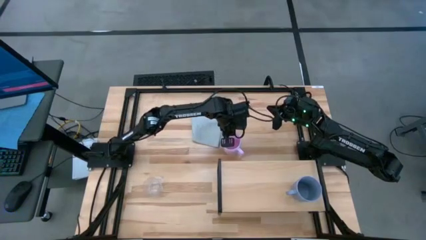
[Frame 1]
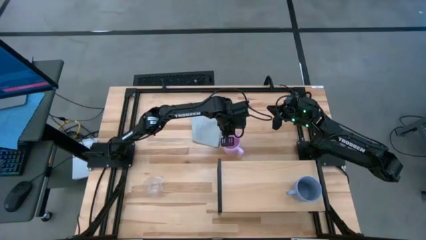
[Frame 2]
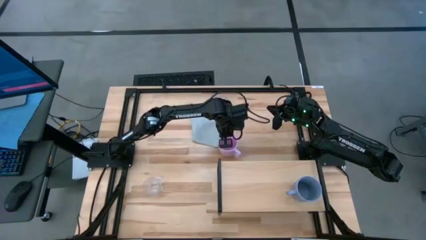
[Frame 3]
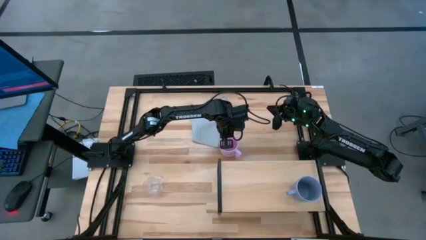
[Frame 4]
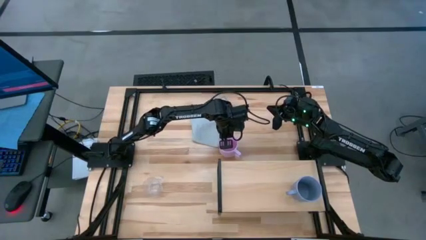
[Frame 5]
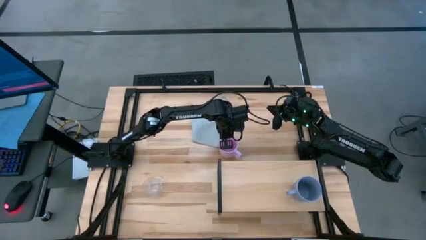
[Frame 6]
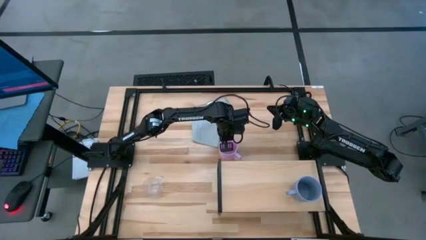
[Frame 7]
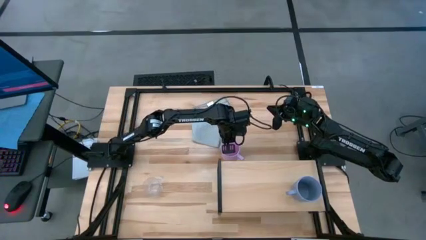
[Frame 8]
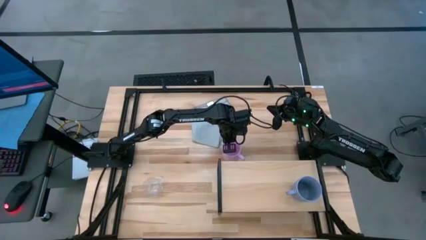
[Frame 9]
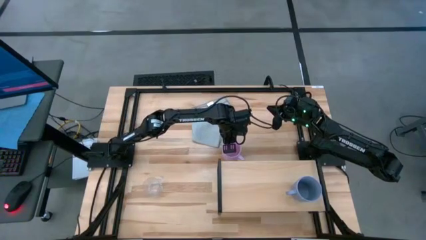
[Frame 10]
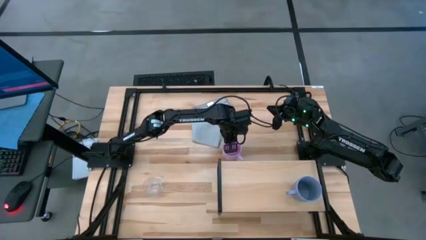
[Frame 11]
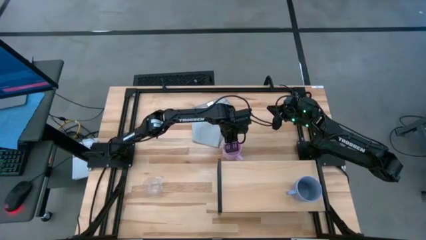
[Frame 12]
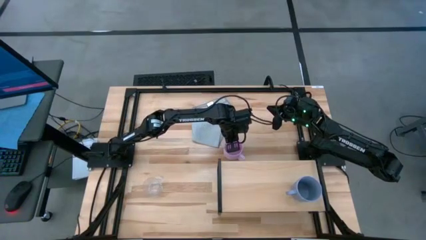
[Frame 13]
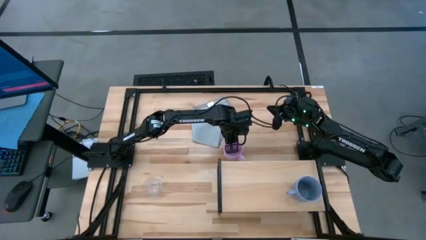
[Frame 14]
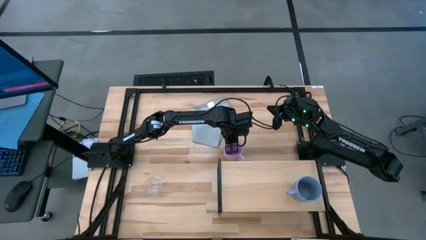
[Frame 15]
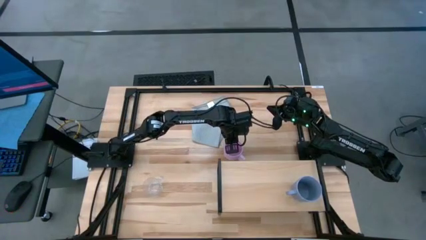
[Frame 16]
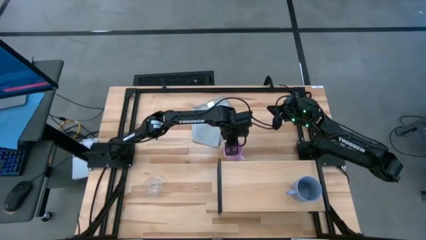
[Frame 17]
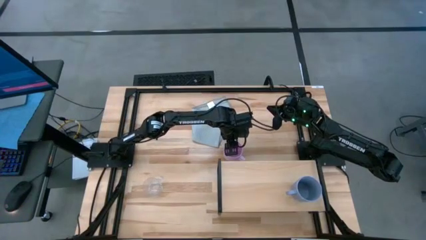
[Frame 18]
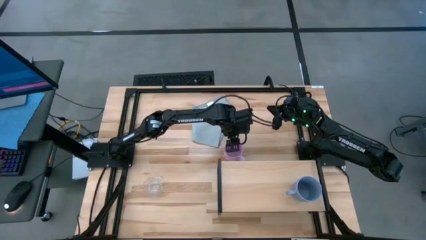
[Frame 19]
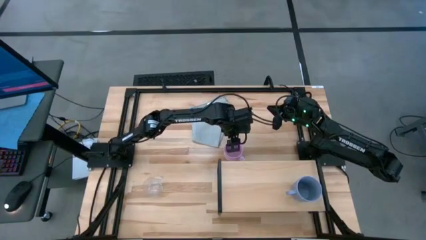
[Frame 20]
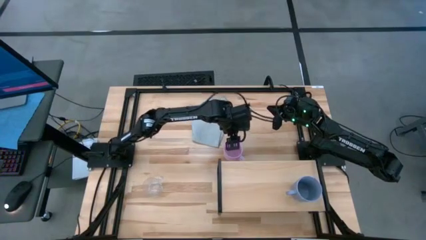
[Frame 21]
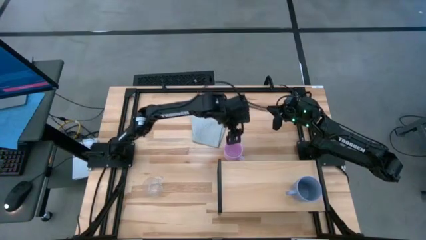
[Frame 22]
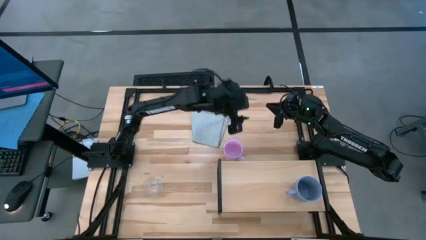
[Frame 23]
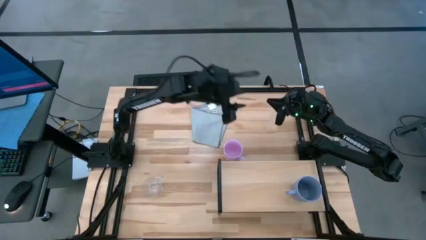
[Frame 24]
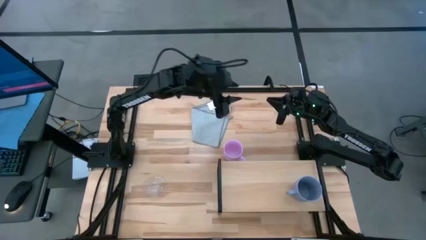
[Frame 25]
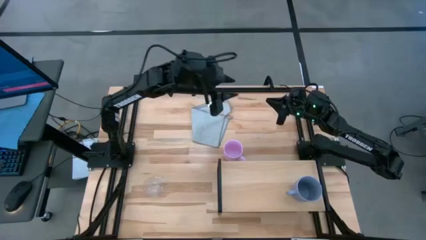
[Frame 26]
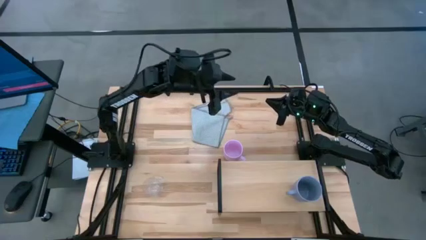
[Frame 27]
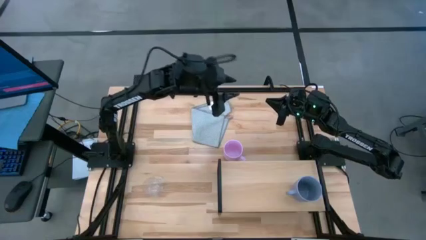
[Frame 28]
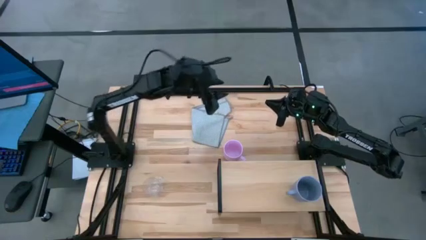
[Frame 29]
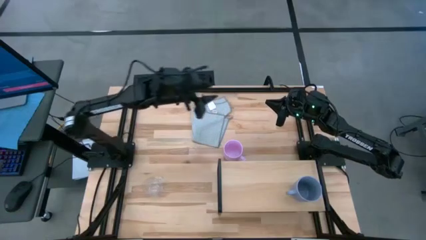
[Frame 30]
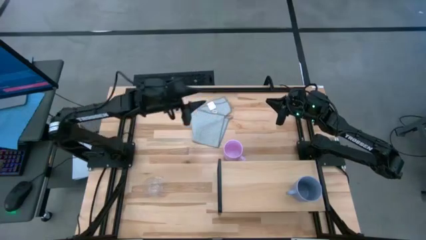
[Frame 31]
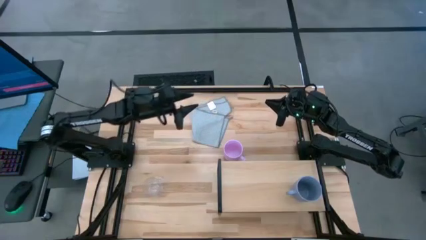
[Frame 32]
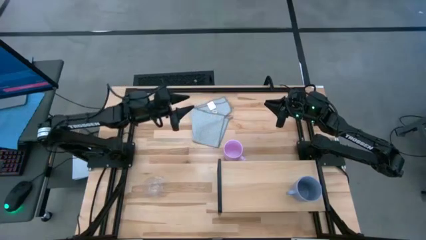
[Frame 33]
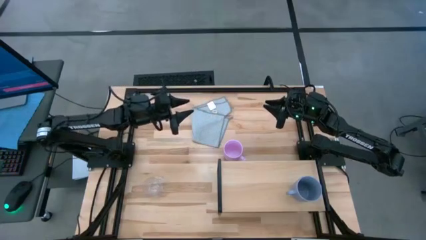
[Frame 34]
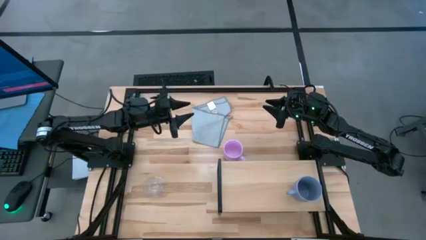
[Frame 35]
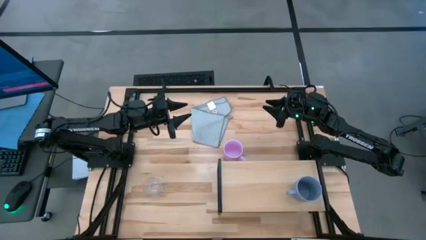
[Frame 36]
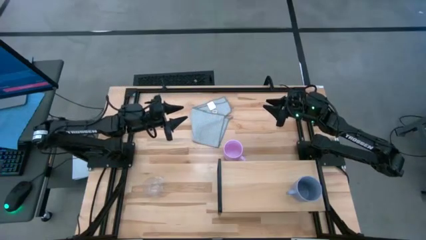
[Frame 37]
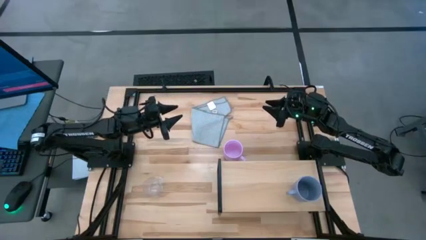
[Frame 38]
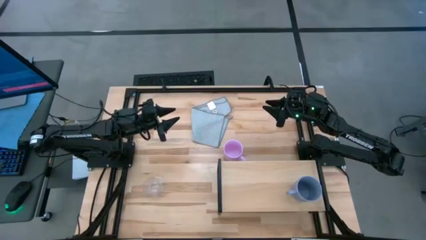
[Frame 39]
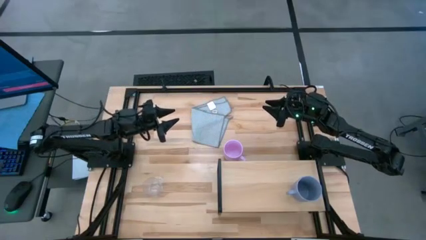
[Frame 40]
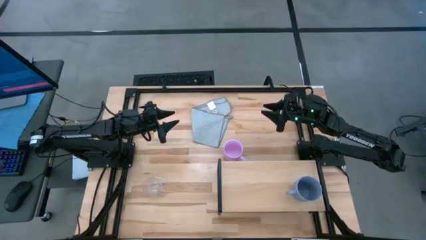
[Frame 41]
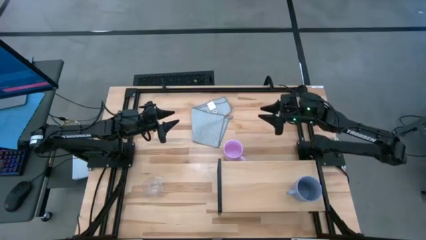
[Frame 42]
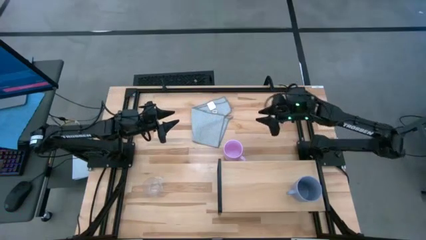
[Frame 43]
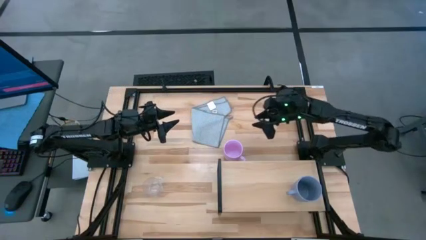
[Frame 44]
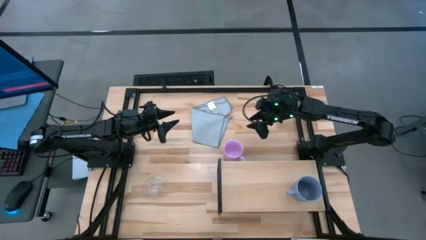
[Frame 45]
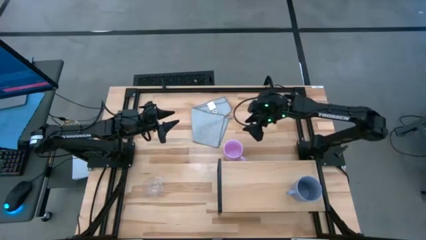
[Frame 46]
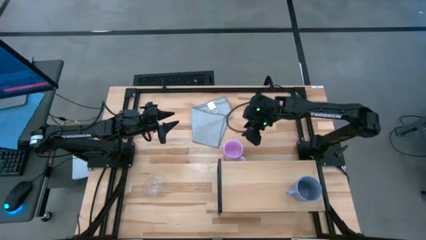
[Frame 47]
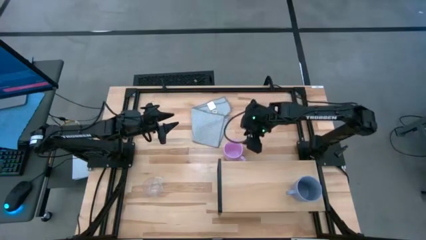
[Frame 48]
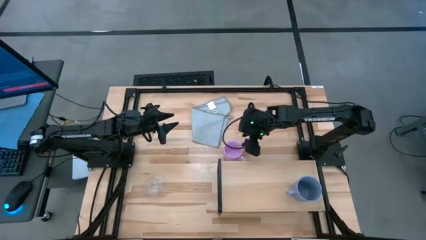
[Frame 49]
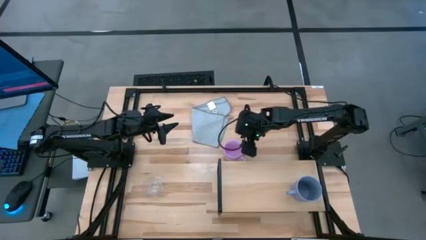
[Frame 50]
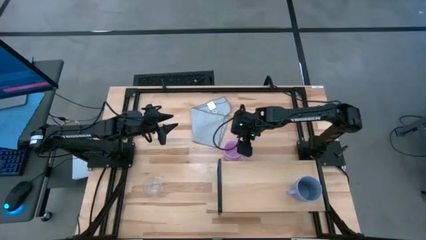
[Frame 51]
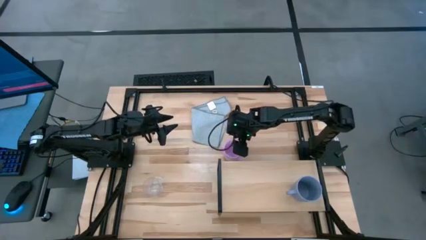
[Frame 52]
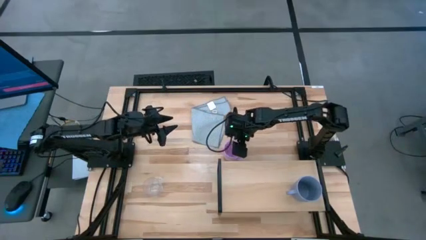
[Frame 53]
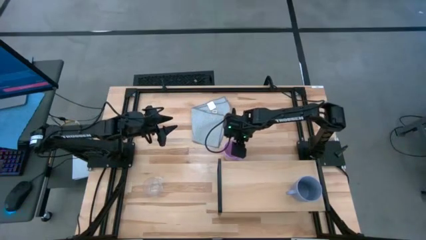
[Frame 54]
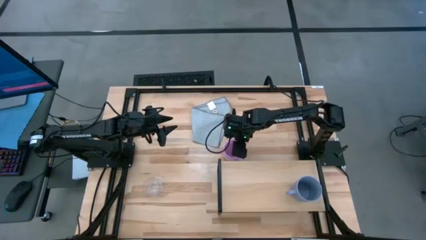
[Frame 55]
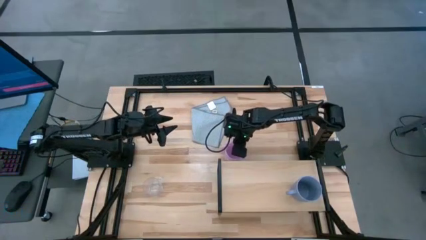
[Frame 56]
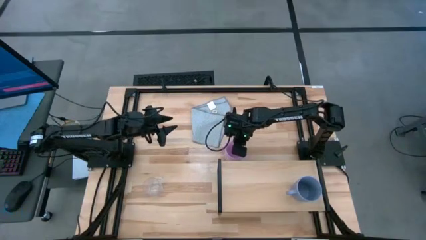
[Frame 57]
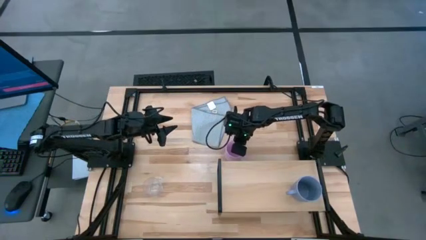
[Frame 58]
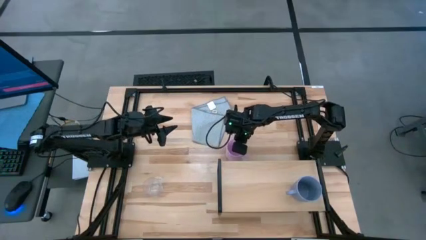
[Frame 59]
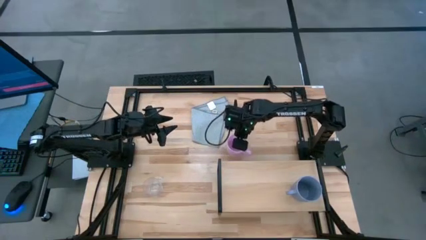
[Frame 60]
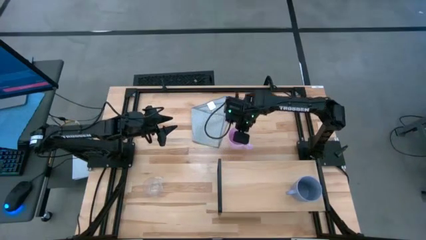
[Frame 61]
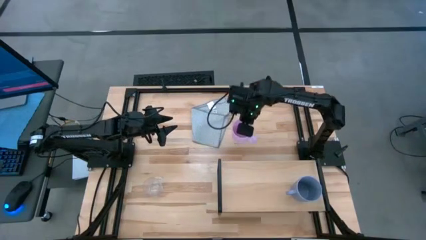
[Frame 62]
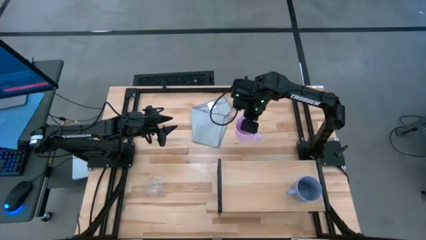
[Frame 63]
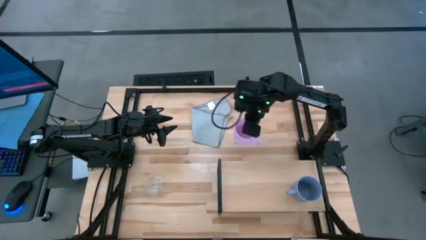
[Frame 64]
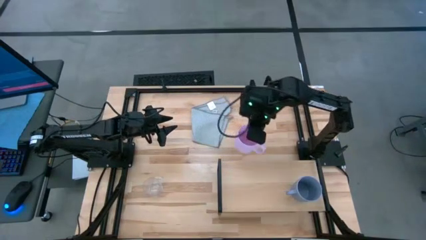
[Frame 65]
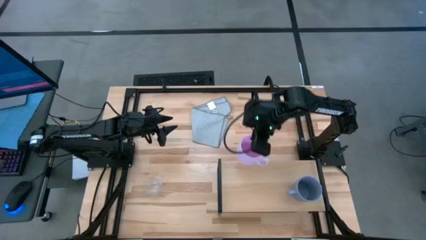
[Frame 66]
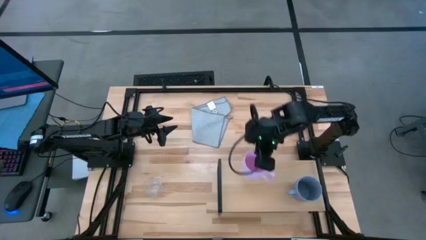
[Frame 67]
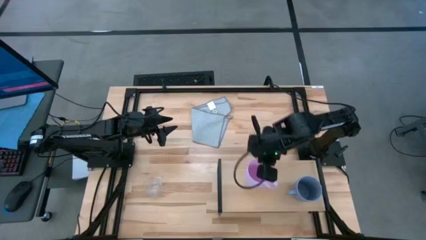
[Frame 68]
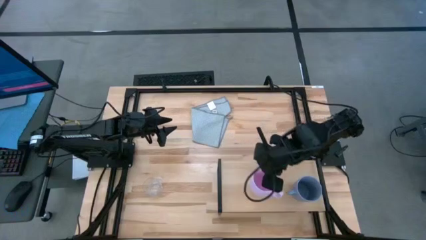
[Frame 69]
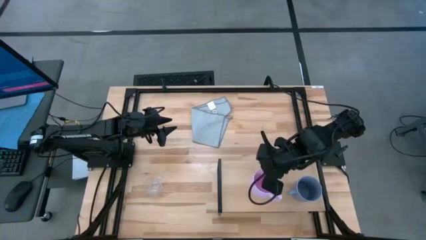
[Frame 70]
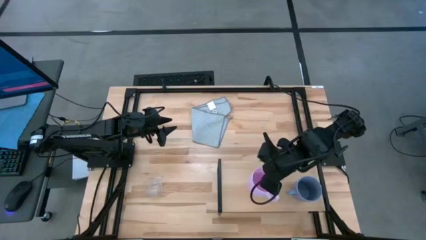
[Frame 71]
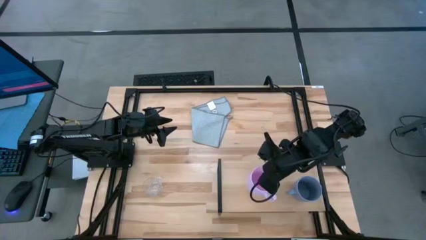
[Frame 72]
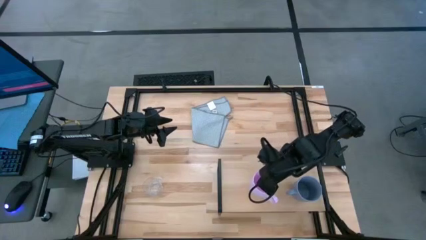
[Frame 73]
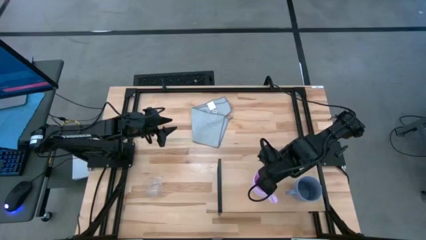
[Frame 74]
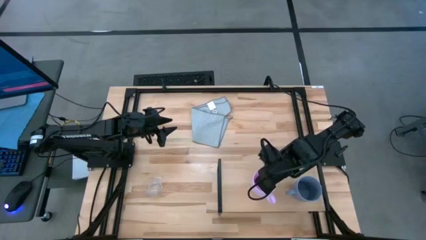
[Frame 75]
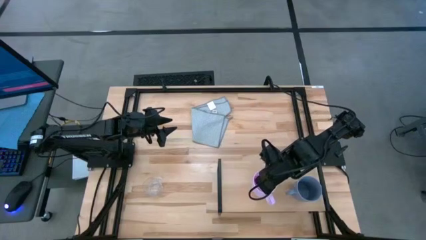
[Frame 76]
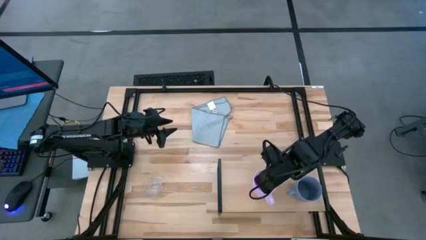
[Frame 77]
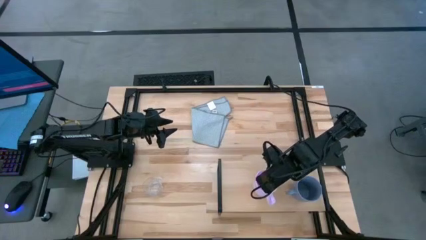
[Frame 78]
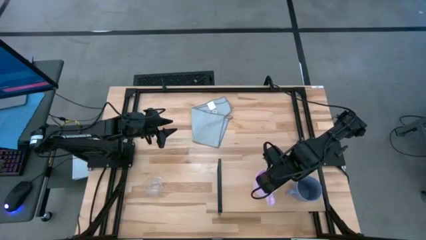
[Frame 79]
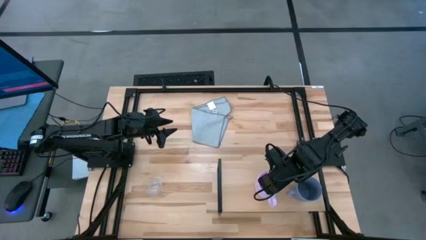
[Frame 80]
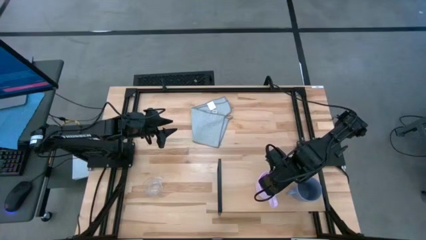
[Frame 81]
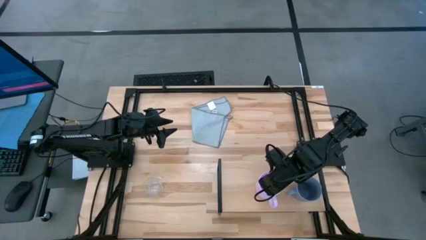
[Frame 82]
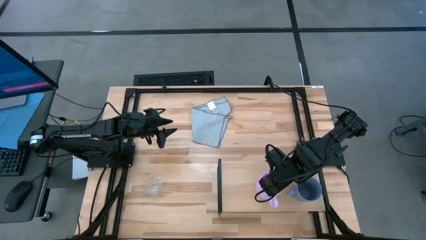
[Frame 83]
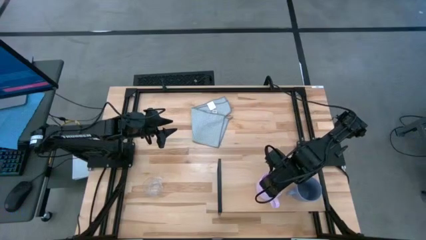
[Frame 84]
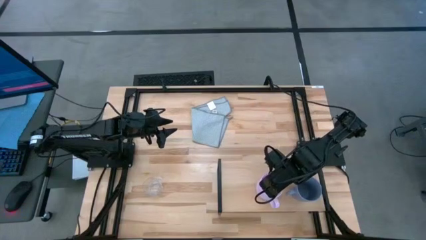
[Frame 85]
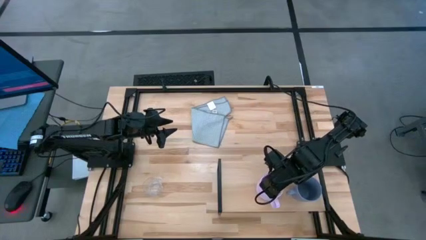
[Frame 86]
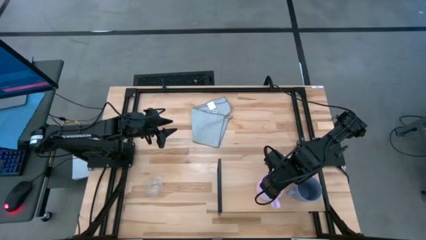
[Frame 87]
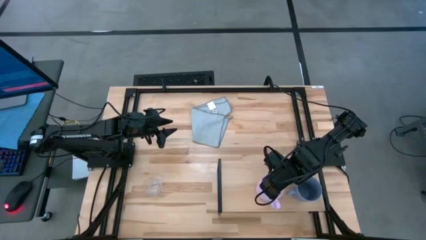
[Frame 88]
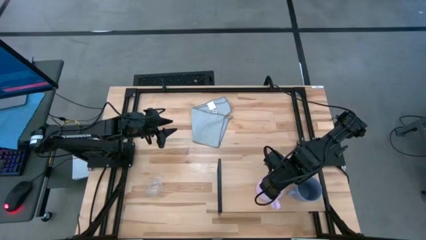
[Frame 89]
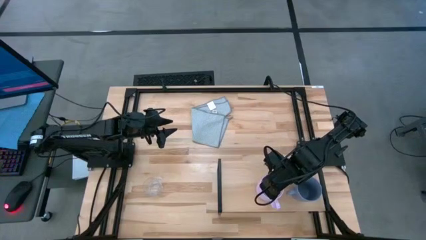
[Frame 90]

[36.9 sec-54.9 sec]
Task: Stack small to large cups/mugs on shelf
Put the pink mug on the shelf
